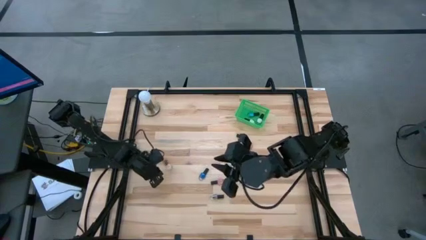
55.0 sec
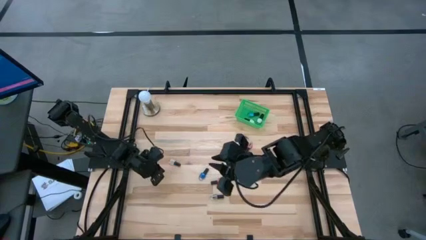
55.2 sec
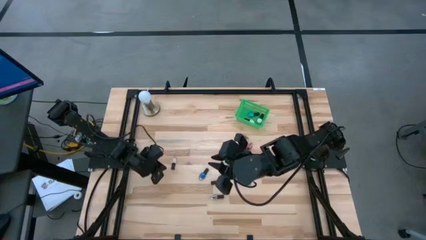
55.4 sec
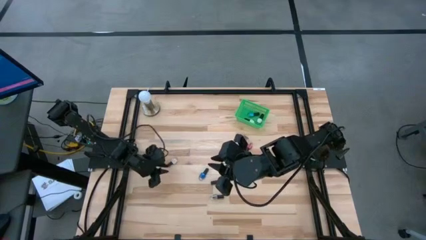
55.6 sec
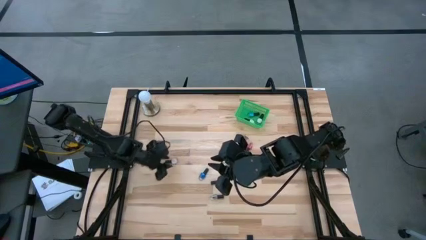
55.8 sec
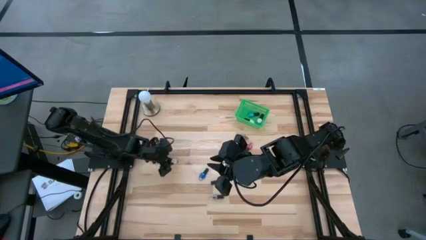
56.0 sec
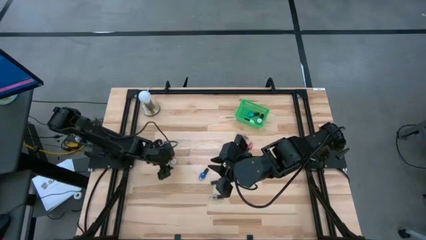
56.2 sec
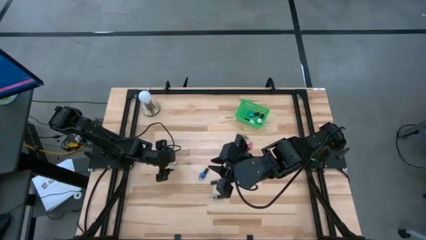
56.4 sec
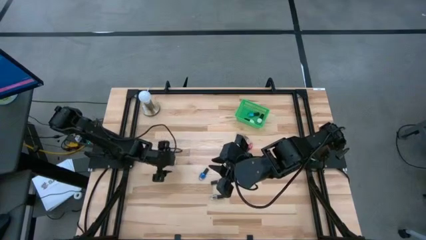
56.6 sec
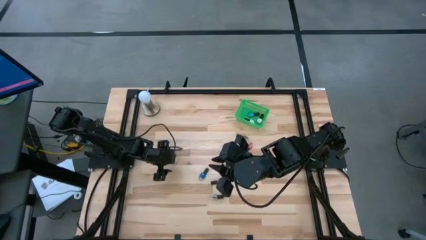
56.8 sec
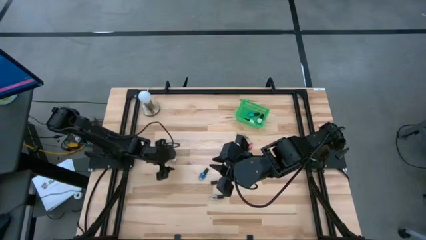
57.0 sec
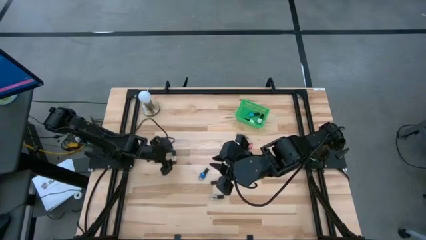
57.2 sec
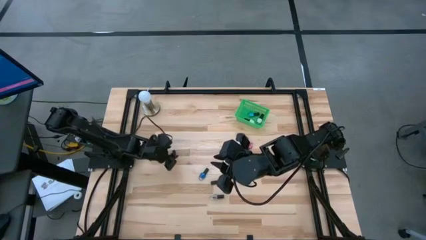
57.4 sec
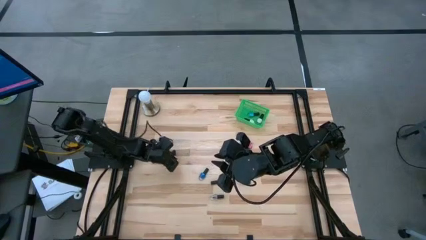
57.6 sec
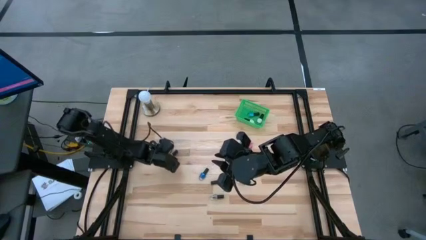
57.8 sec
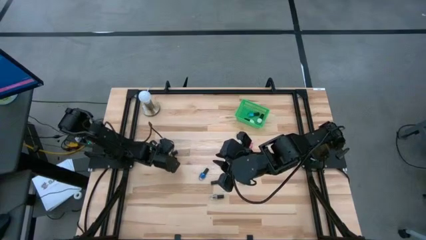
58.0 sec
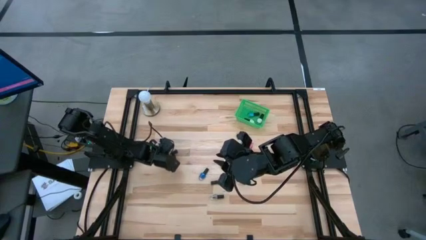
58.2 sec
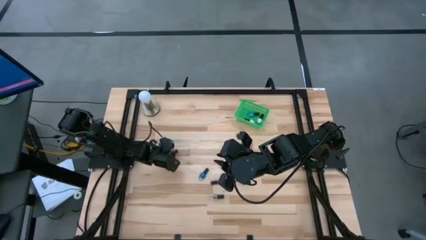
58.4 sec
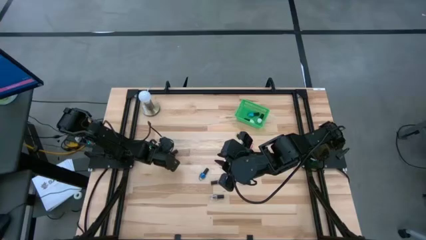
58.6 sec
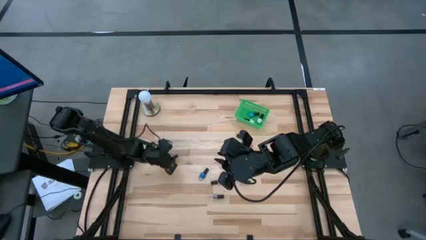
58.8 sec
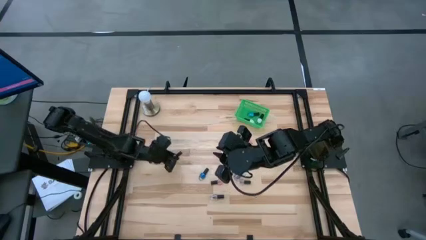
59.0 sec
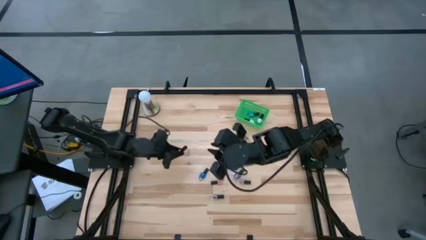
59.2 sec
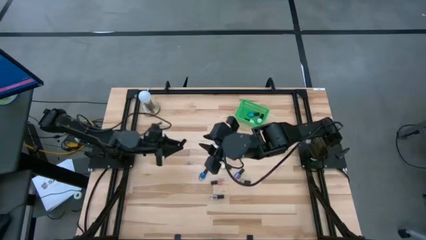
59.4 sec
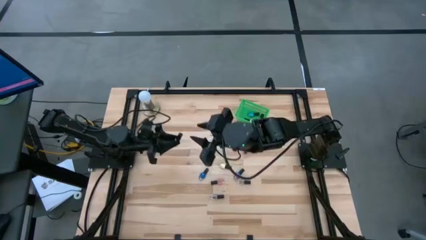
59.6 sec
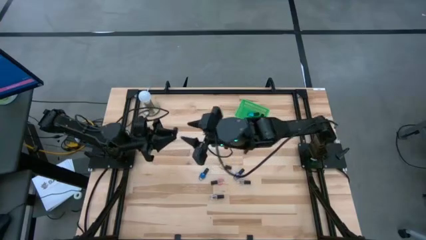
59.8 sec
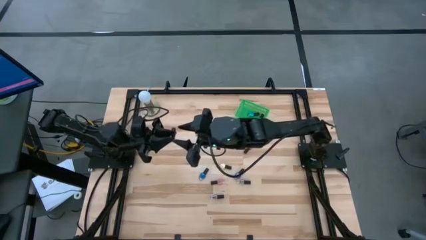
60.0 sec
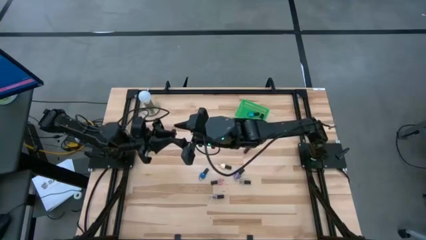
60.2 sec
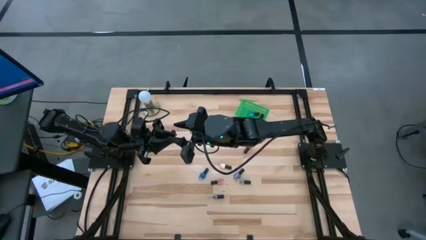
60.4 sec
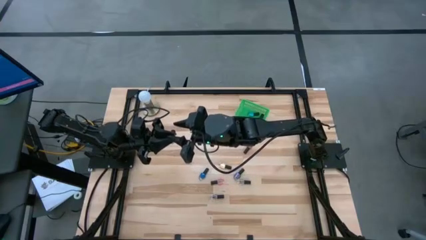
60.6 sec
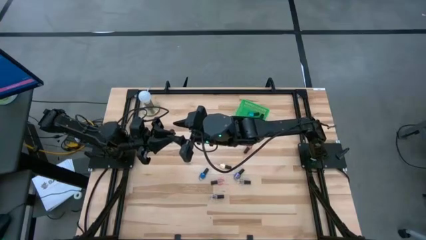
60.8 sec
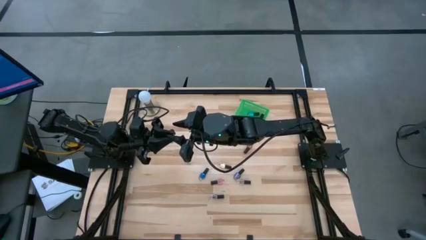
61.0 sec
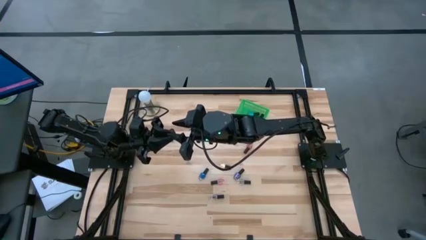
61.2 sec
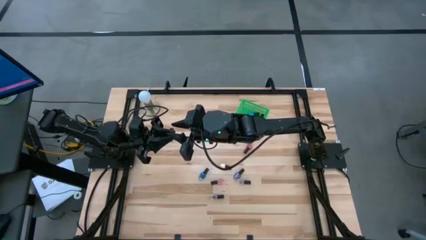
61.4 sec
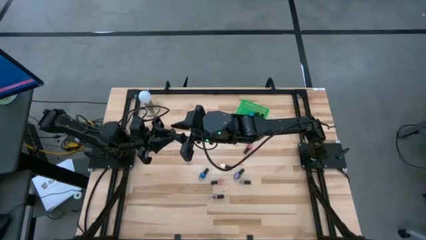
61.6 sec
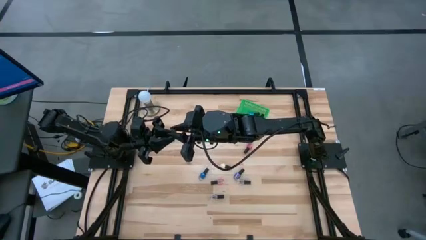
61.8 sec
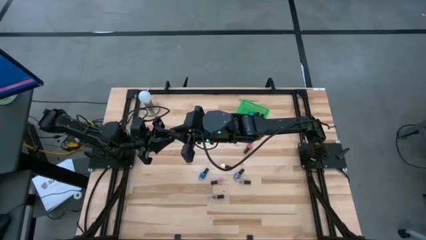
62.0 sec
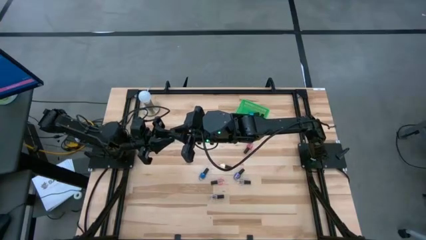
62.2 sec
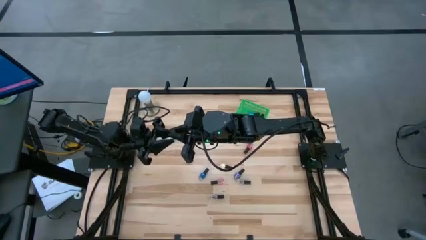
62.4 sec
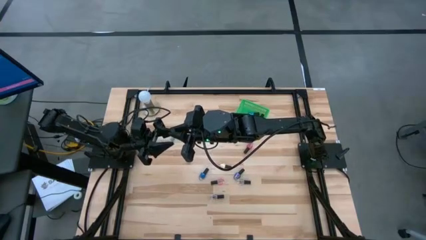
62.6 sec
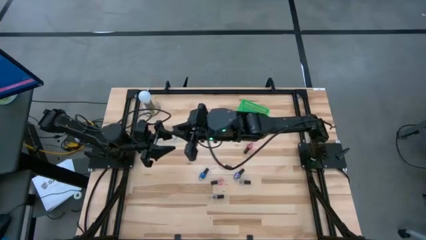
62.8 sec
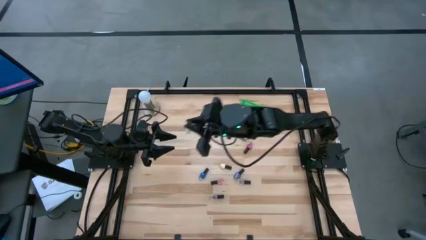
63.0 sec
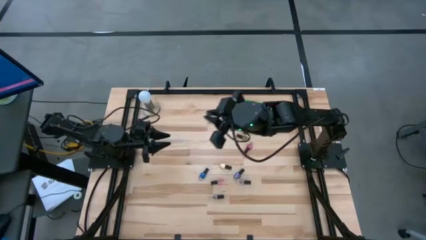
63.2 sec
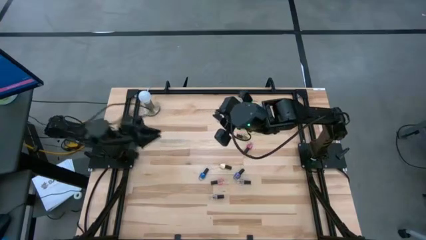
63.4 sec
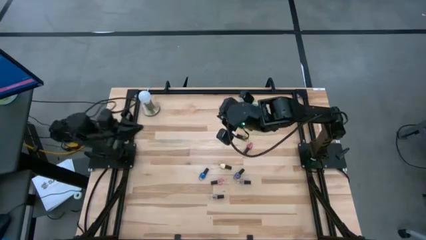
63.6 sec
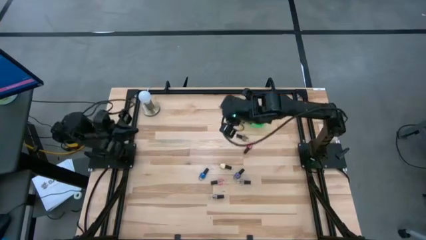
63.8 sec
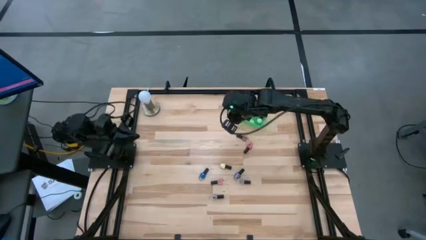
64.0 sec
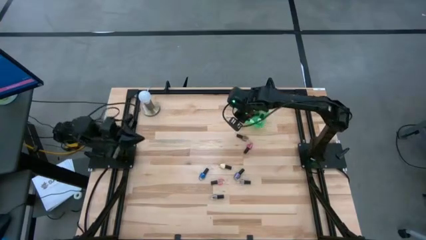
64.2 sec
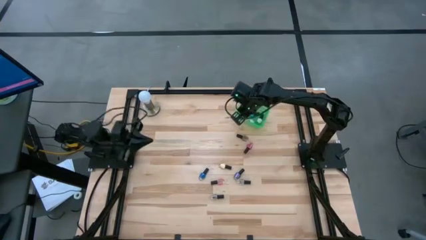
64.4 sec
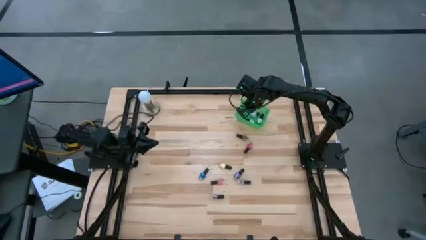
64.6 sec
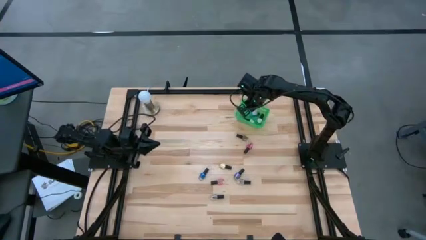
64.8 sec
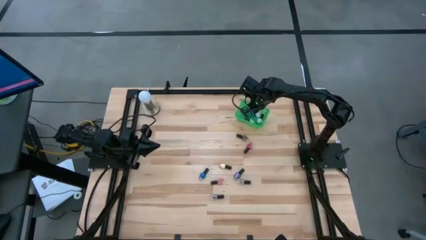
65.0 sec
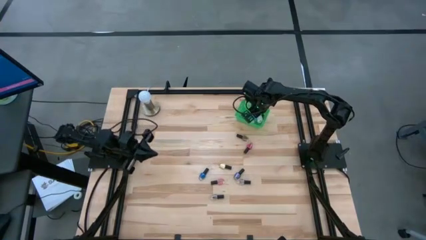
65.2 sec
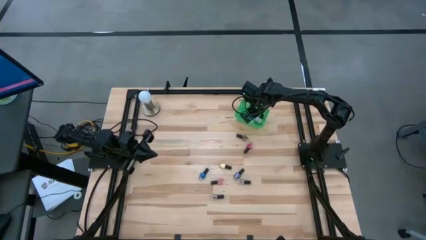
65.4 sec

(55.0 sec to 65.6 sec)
Task: Pick & Place Nail Polish
Put the white nail polish into the green bin

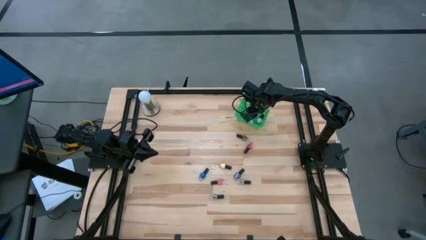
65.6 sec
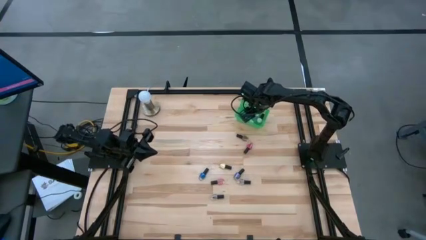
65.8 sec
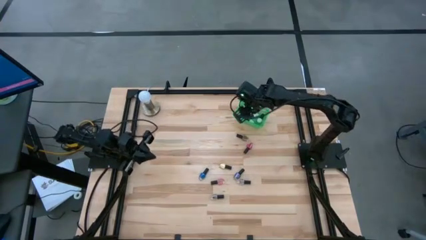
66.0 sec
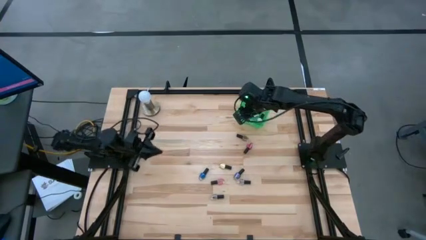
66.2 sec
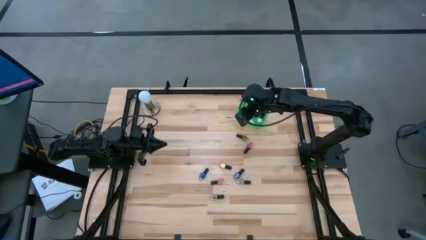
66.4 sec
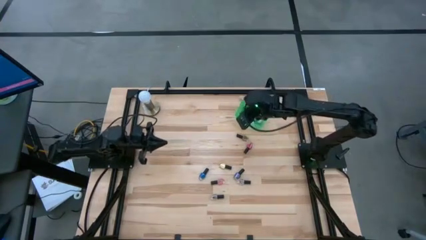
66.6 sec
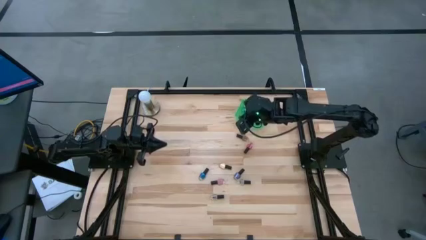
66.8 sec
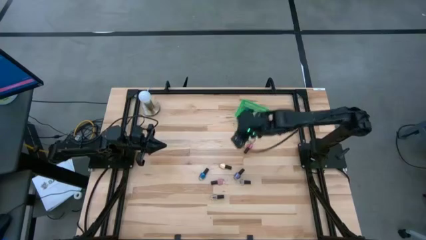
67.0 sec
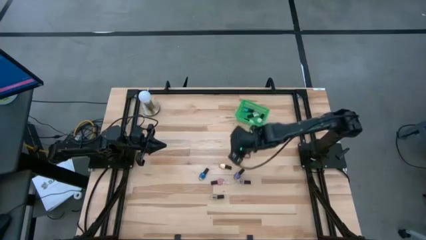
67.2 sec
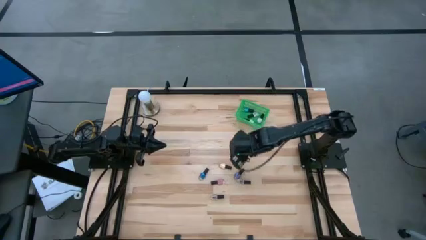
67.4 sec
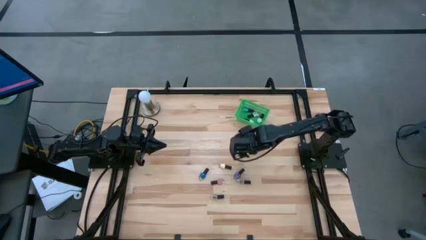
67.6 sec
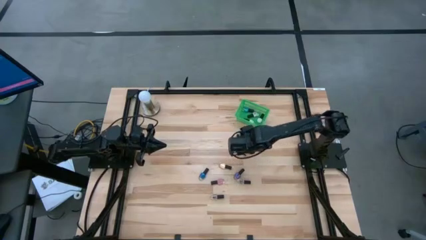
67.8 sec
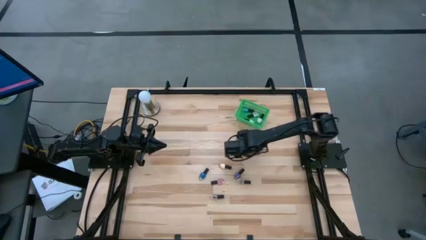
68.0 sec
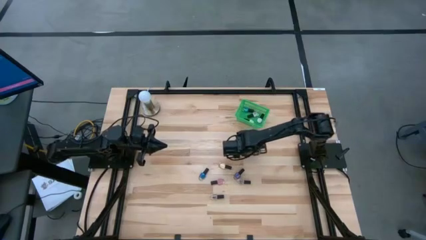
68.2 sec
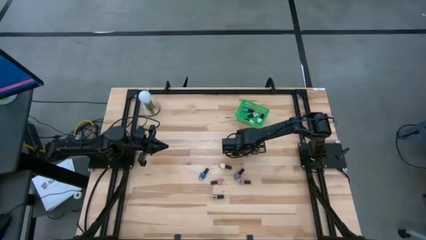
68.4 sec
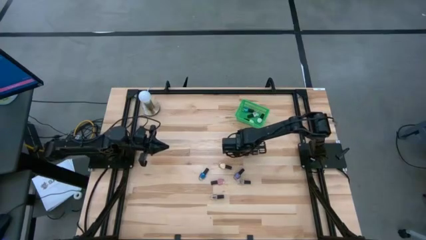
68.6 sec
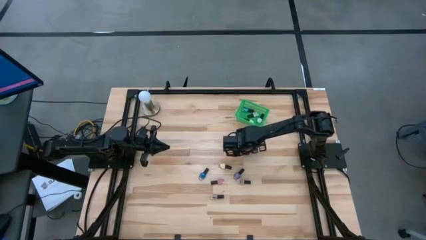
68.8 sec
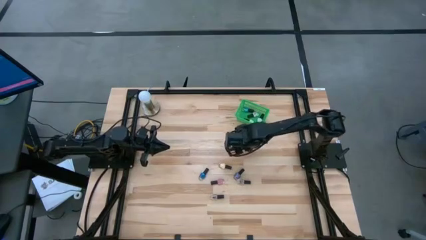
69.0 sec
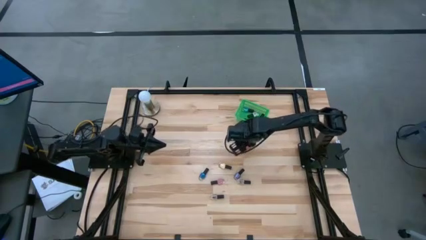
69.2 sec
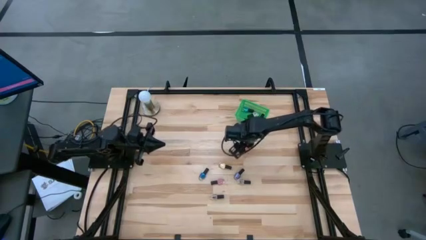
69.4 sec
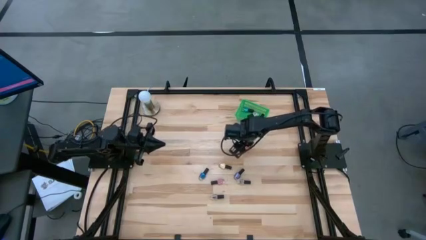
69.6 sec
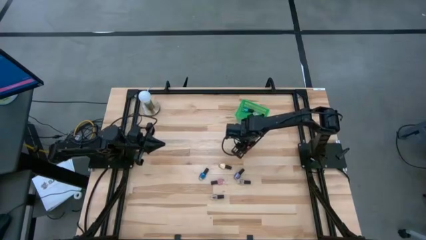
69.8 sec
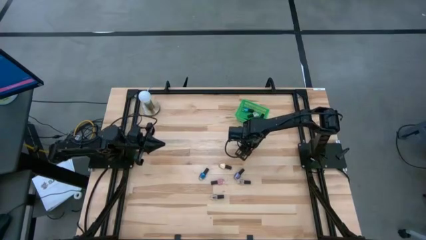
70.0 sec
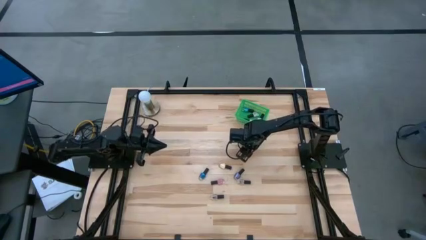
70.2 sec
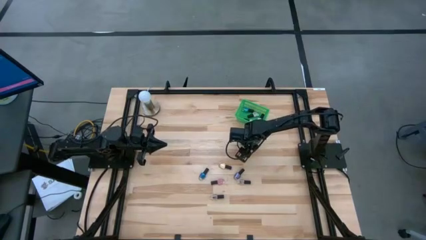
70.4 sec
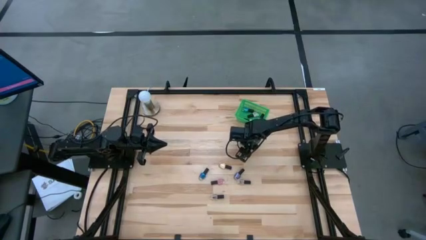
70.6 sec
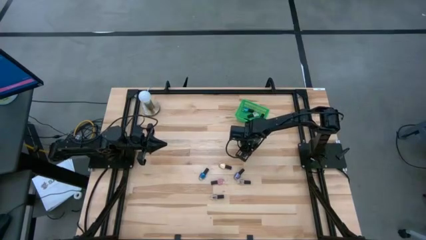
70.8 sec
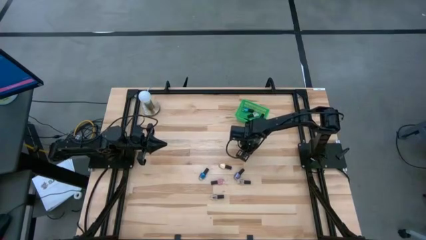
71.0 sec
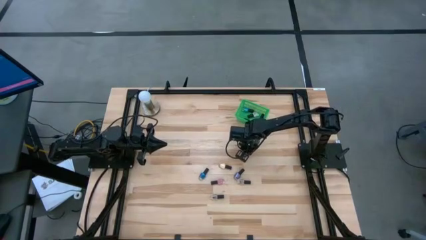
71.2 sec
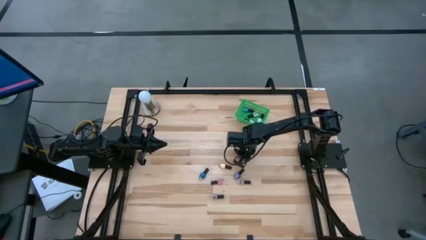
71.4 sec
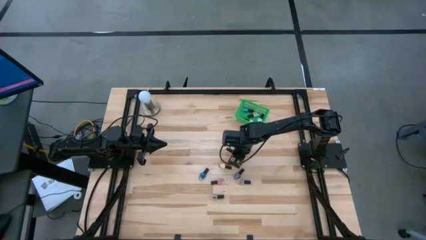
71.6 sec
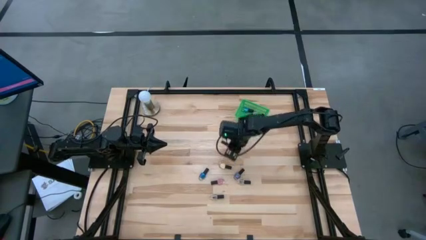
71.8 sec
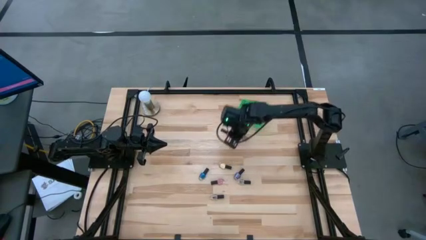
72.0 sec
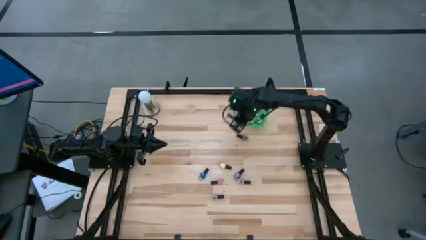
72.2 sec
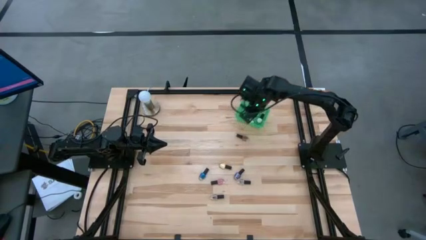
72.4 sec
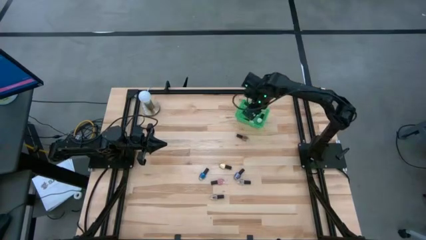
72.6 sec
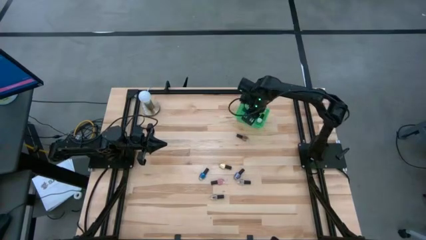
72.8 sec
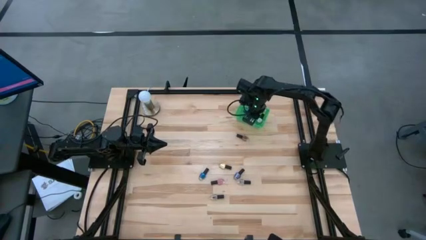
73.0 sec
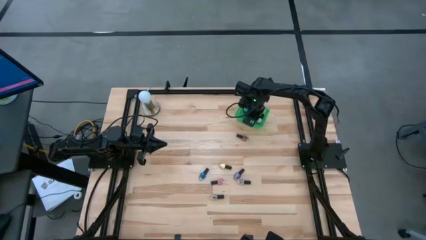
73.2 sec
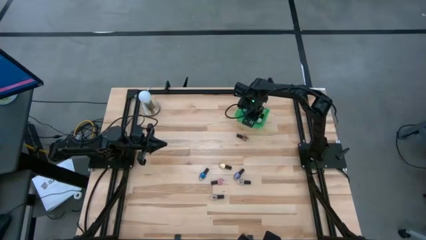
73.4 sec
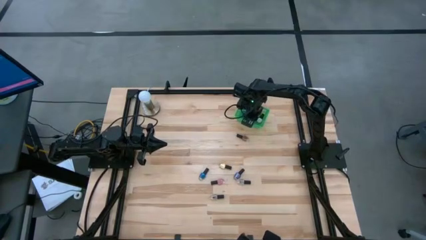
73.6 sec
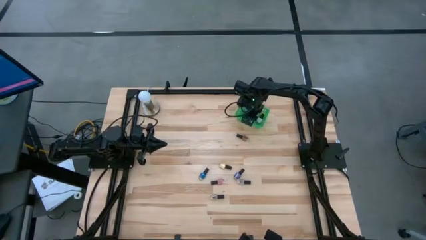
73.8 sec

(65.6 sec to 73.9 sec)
Put the red nail polish into the green bin
